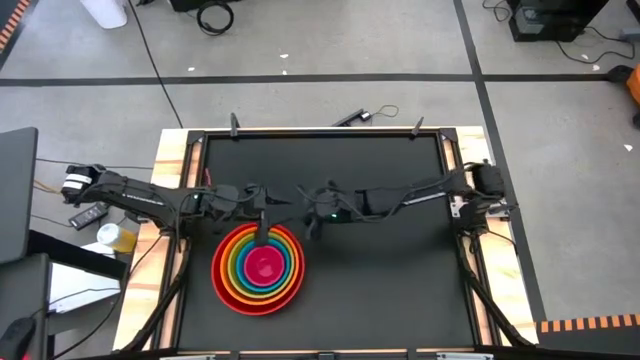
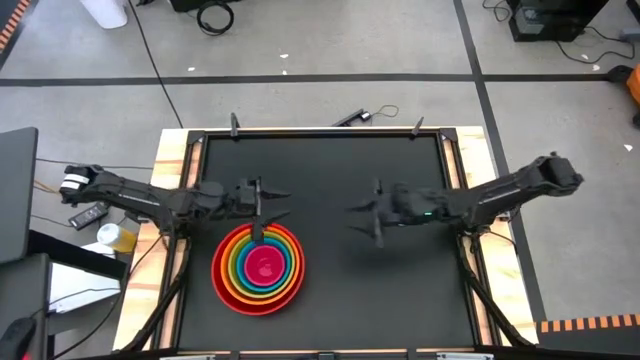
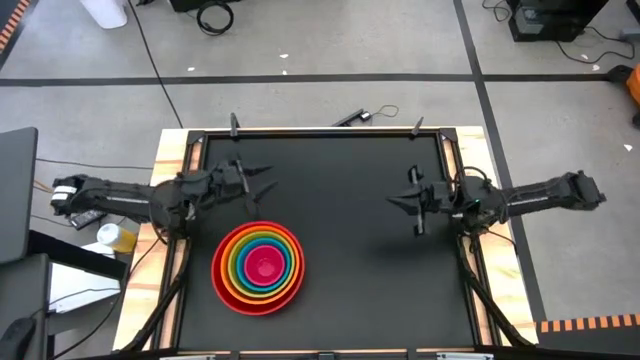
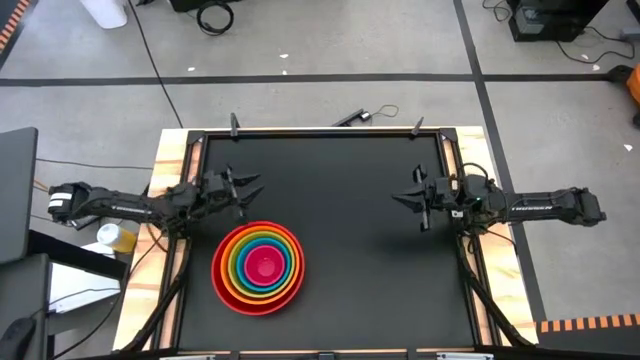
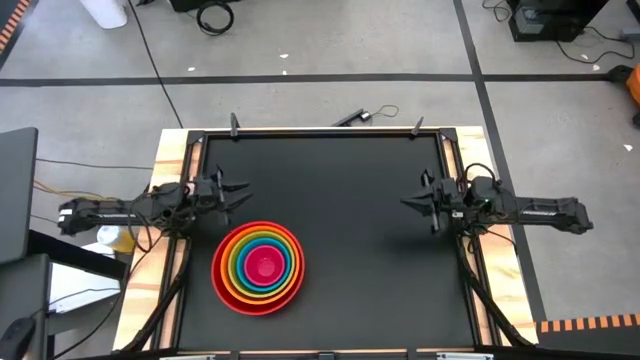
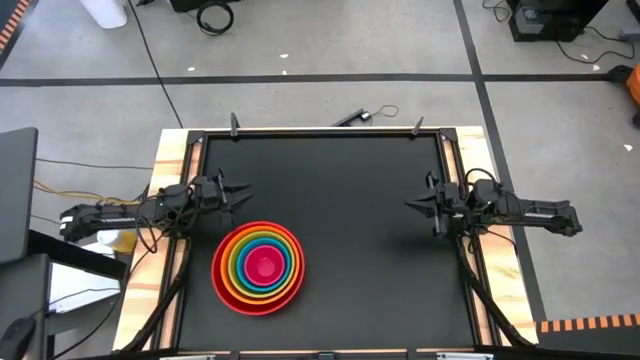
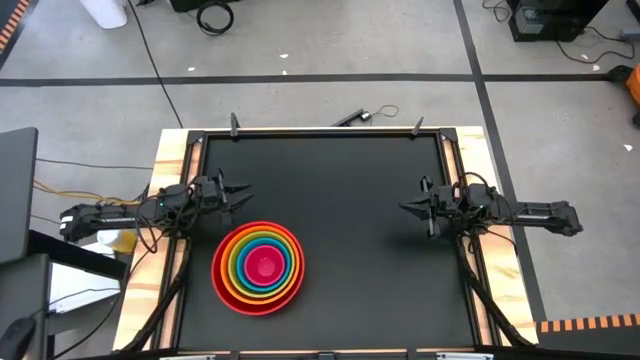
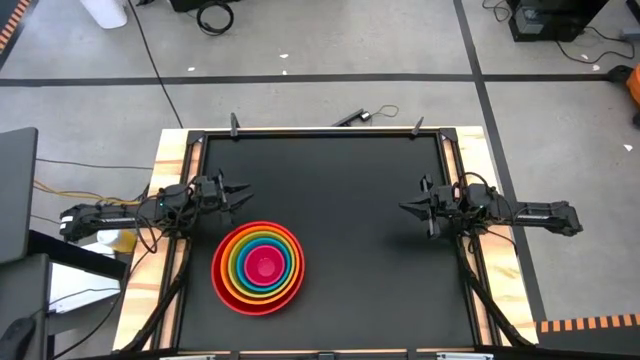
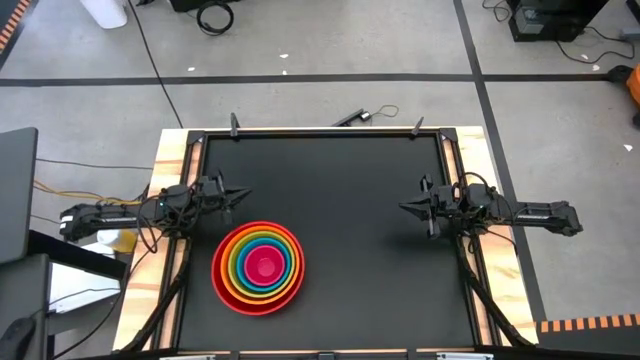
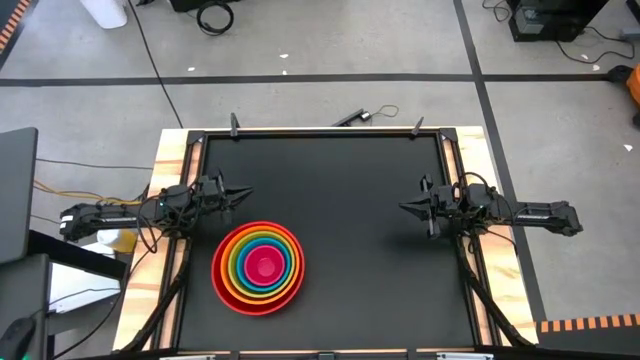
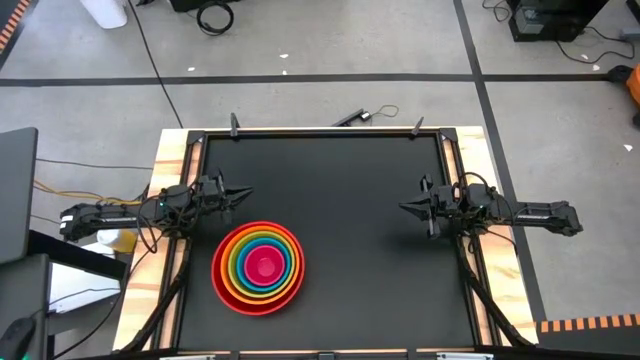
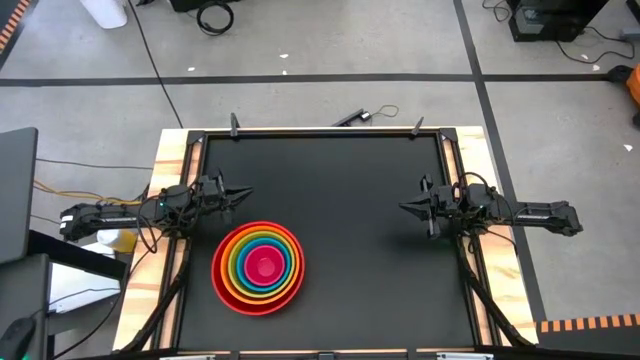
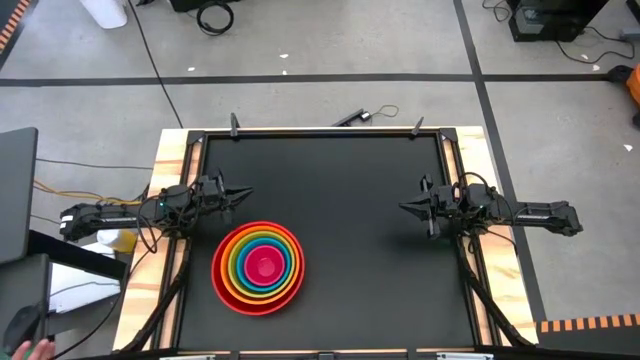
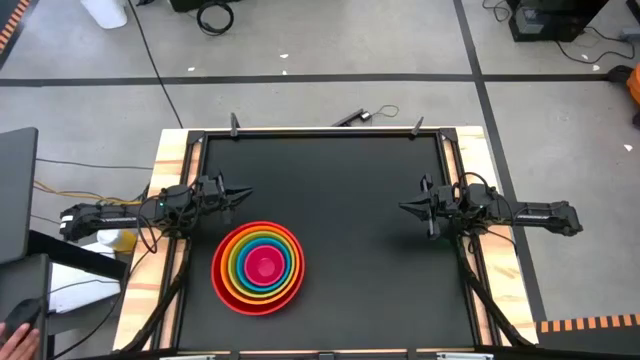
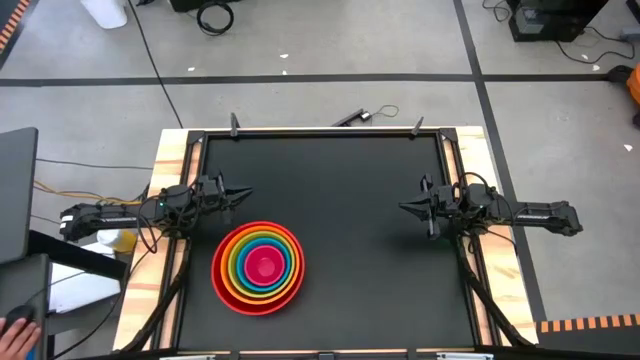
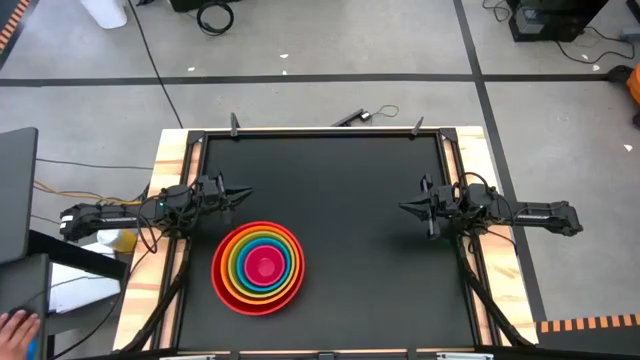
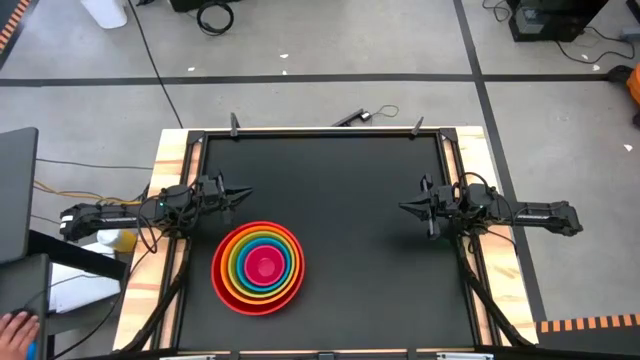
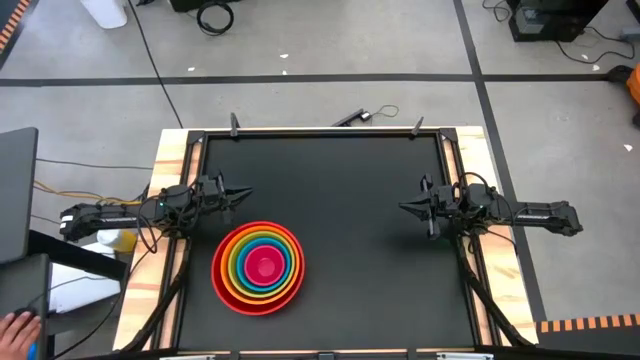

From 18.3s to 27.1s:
Return to Home Position

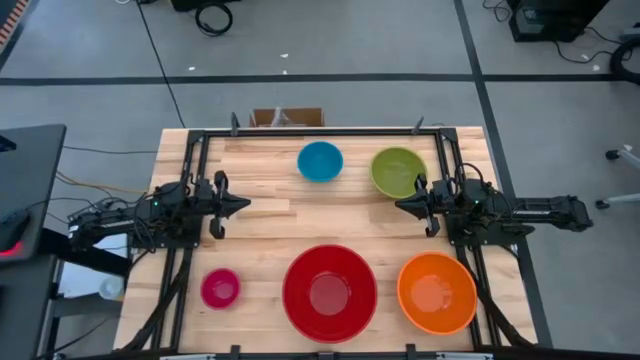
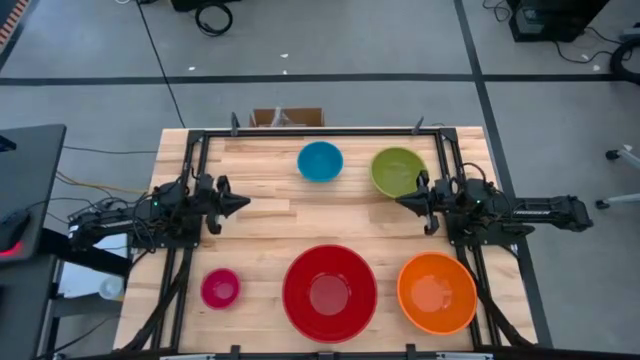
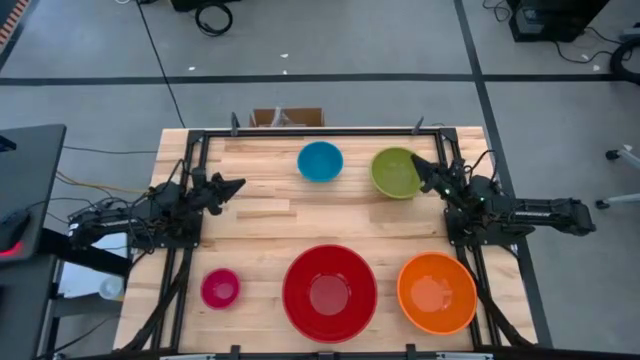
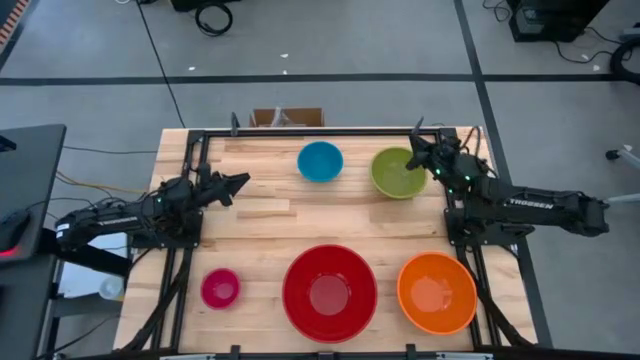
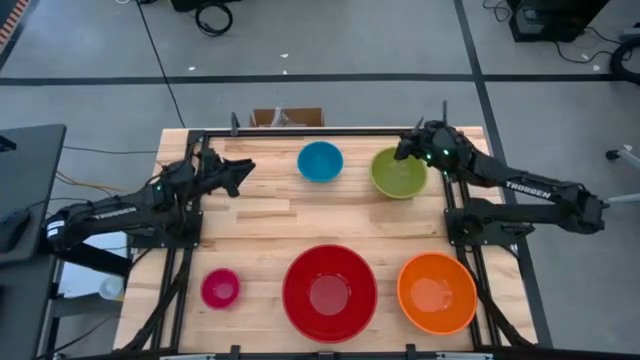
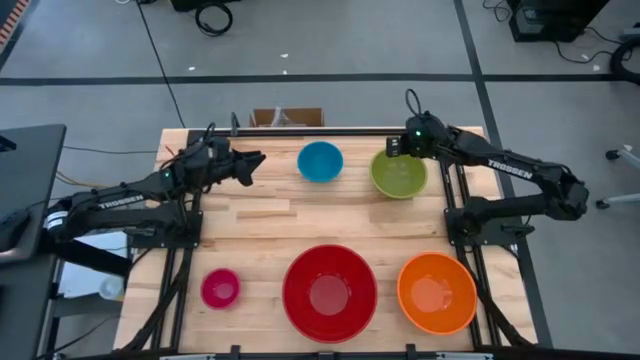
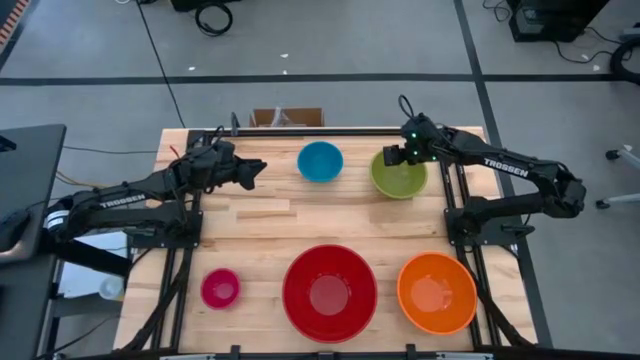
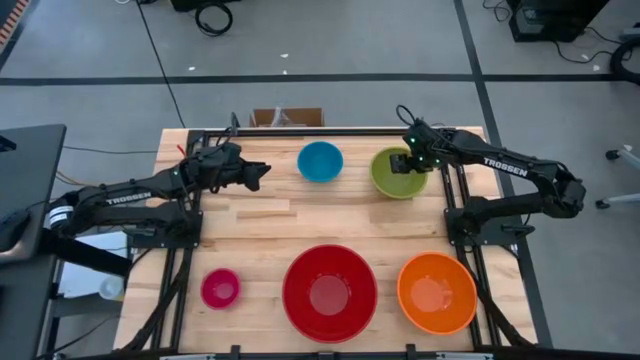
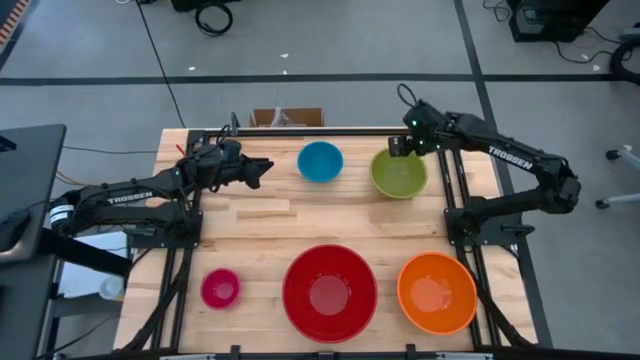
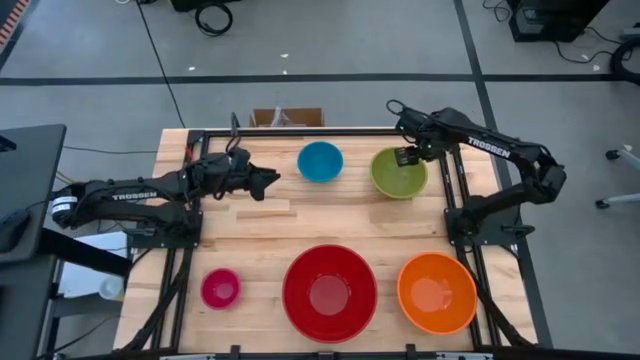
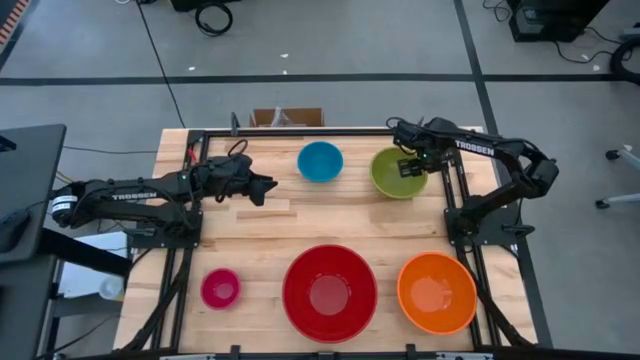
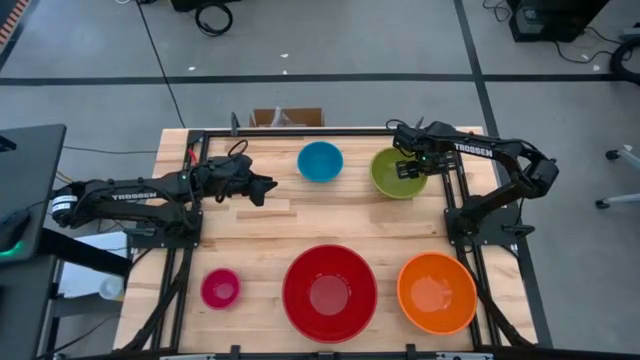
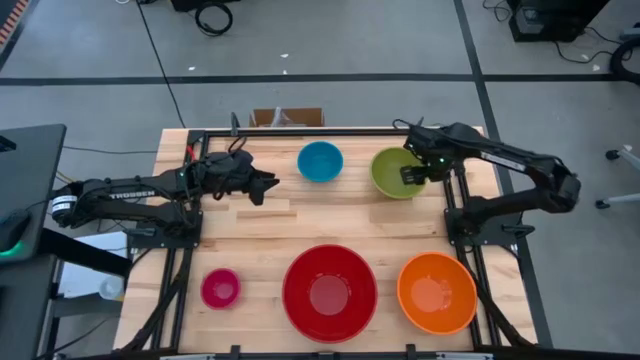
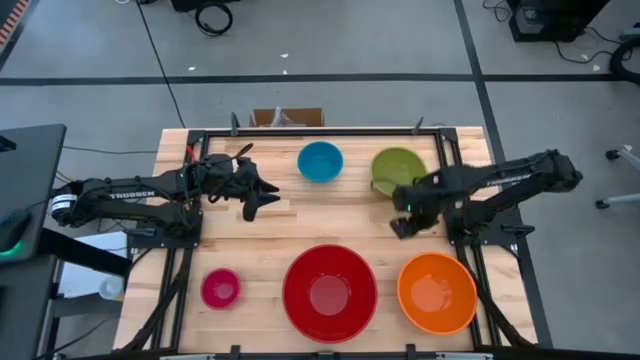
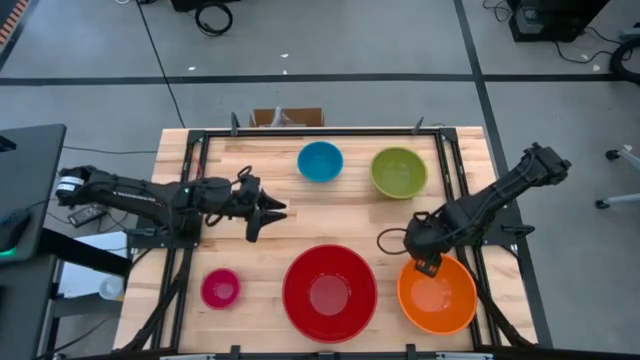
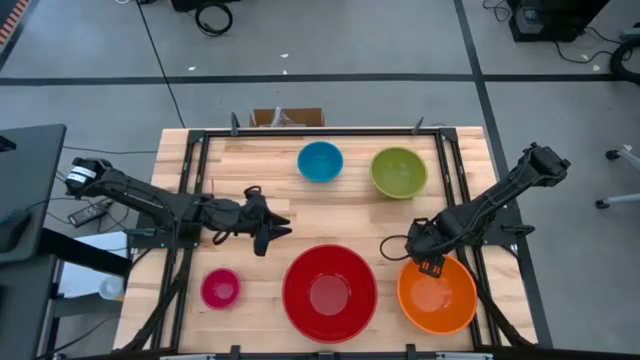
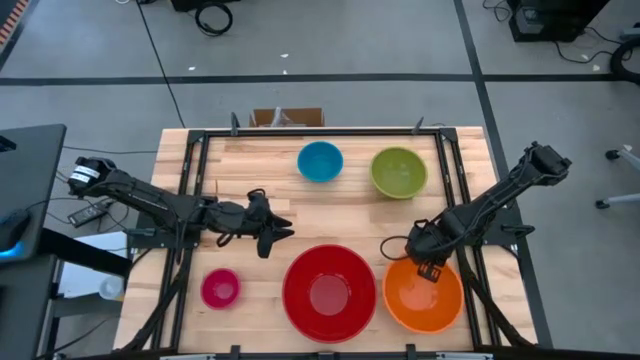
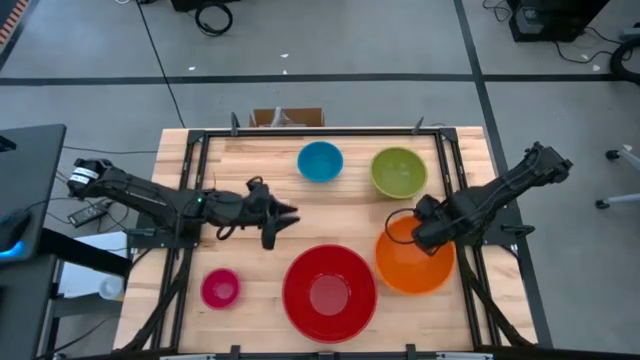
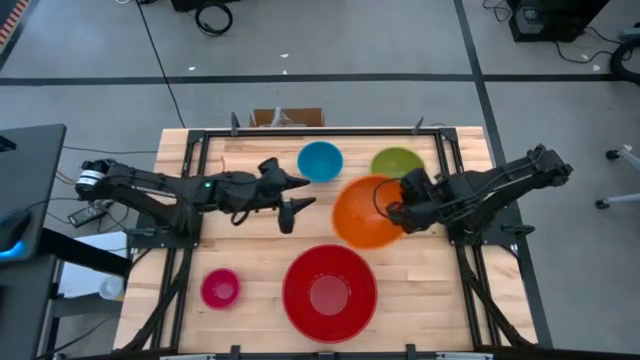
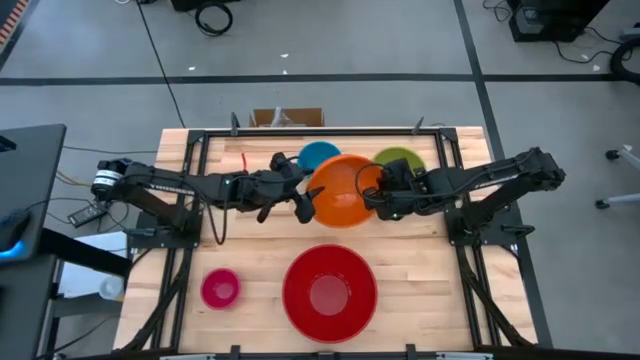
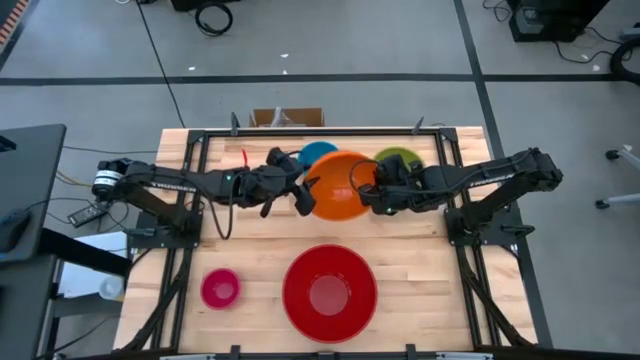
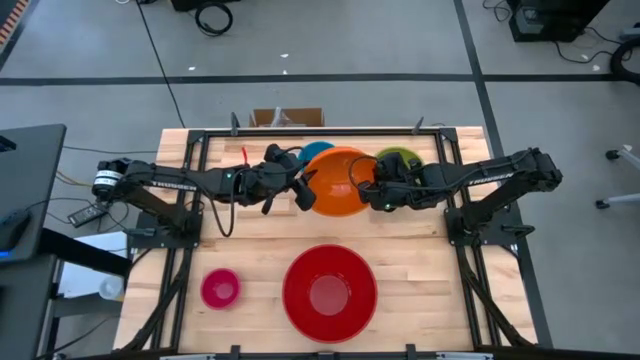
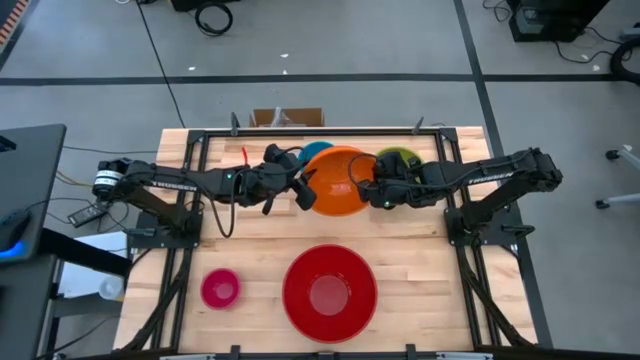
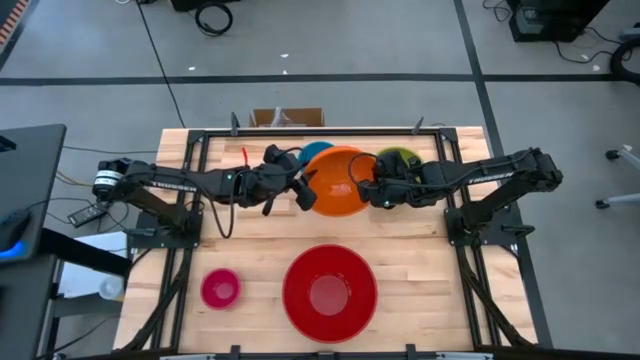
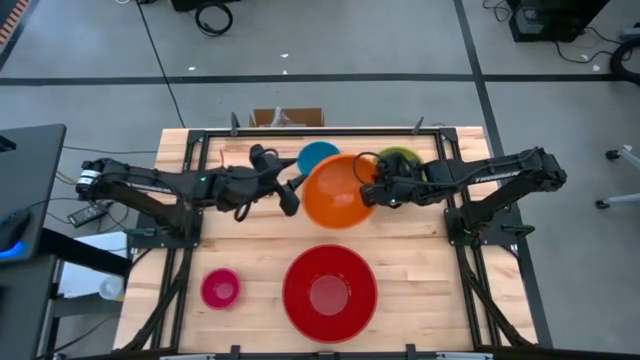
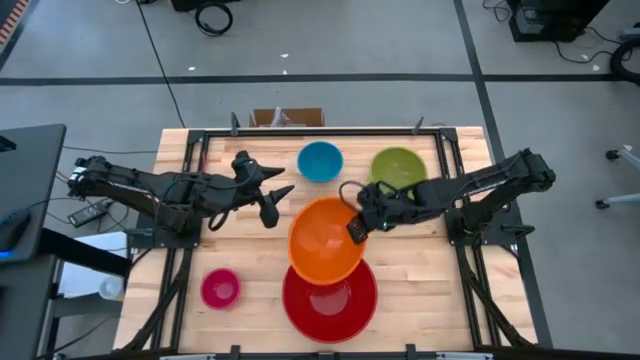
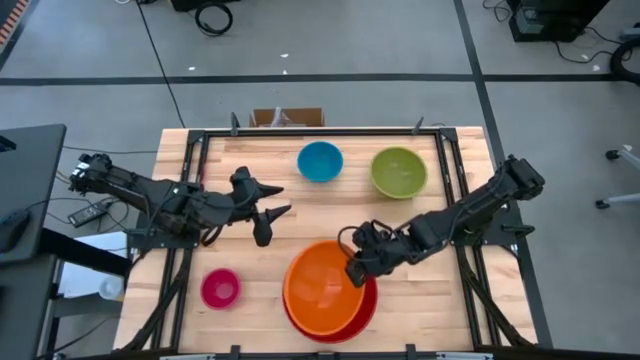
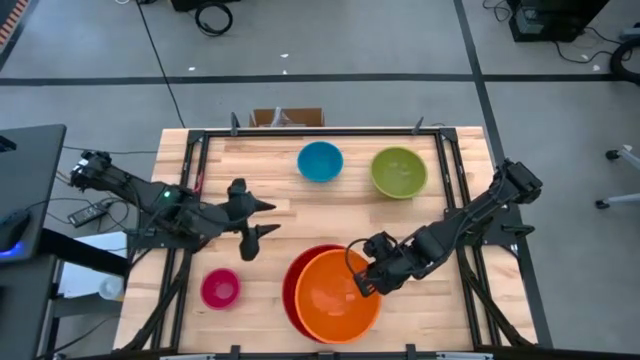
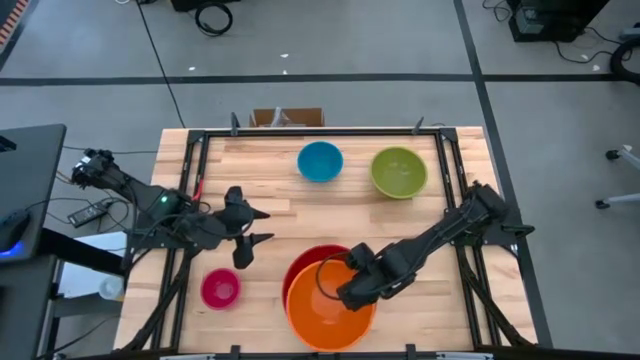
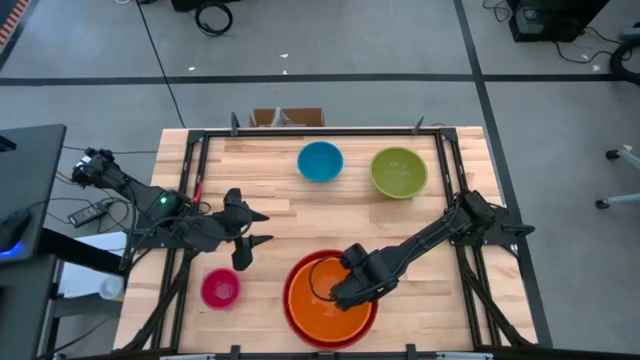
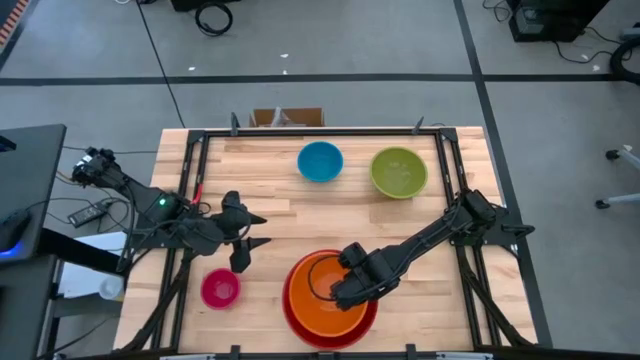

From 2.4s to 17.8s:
Stack the orange bowl on top of the red bowl
